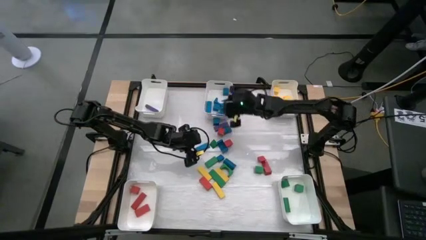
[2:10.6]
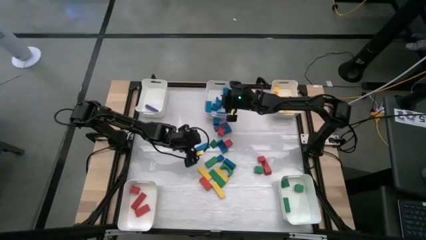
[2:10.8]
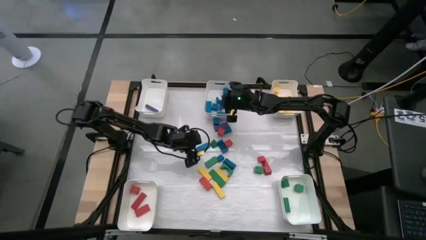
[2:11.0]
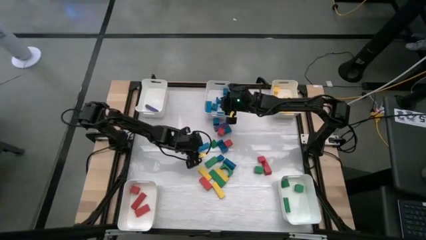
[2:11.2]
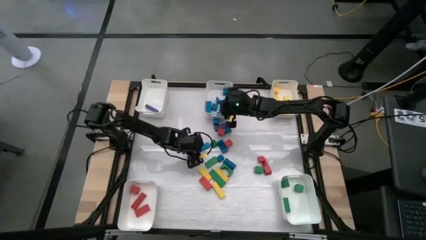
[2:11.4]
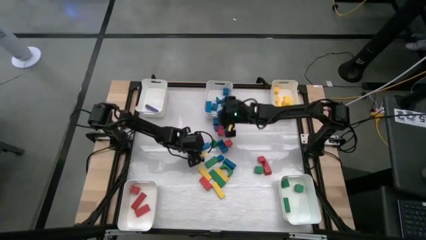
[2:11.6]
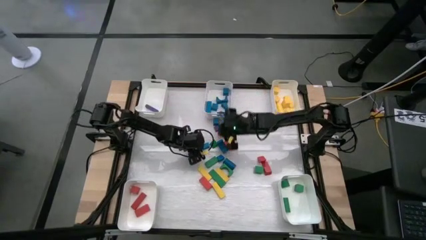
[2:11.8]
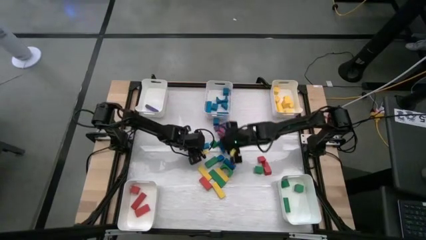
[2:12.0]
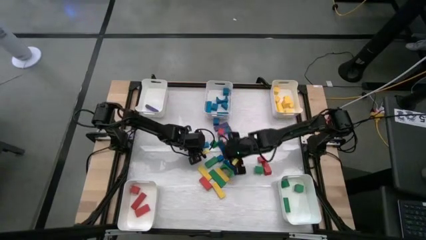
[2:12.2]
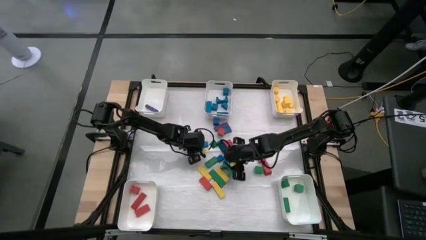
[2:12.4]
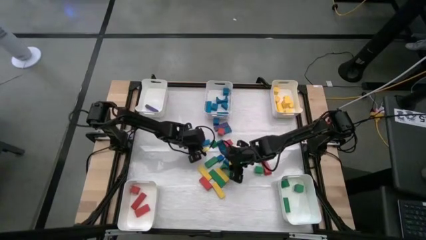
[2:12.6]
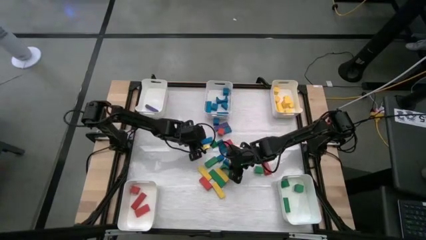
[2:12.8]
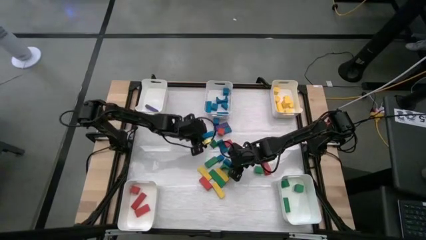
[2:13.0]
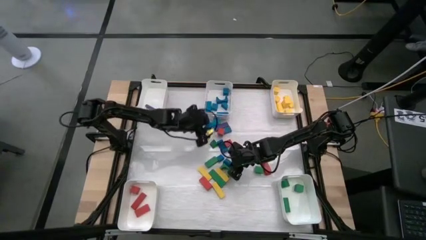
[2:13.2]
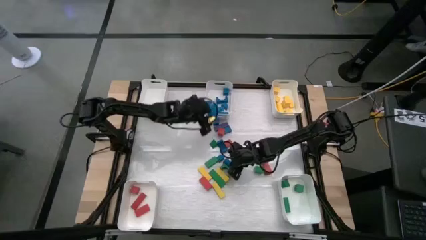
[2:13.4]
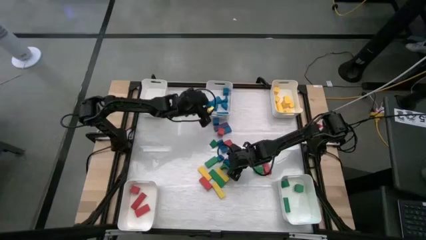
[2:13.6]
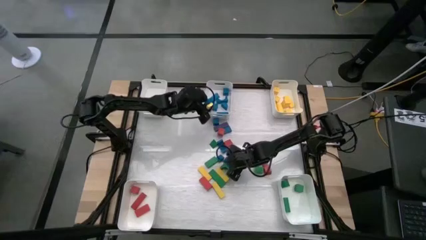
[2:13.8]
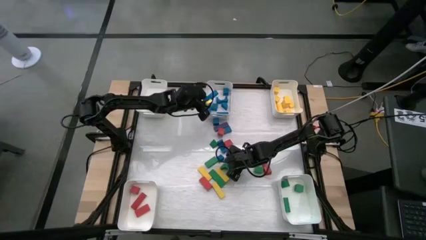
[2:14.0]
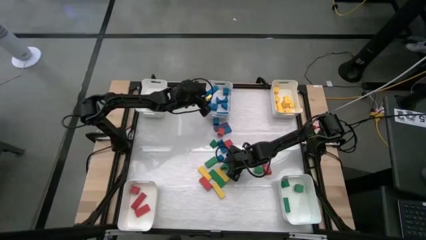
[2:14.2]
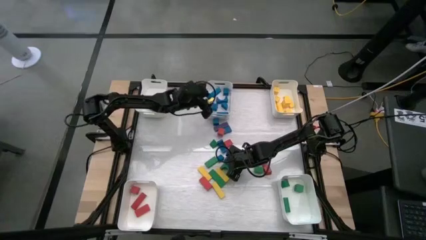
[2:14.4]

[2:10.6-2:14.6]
Task: Sort blocks
Put the blue block into the top center white bin

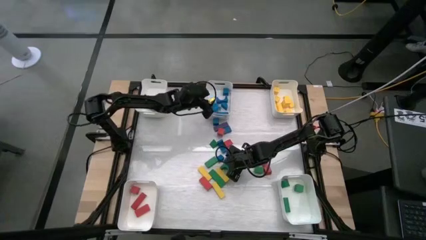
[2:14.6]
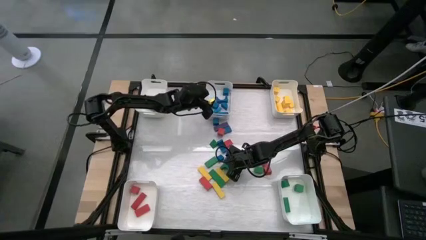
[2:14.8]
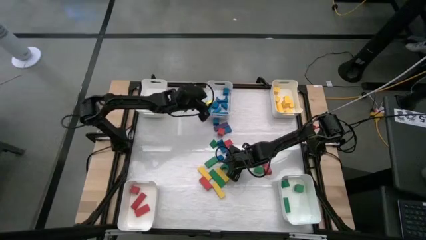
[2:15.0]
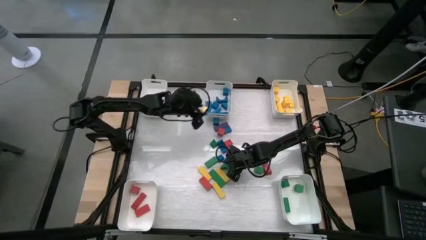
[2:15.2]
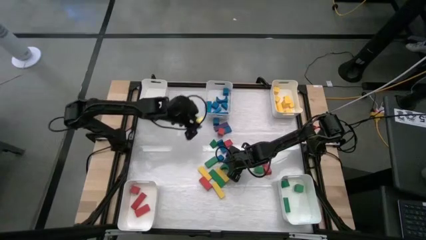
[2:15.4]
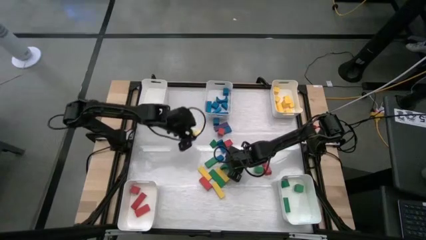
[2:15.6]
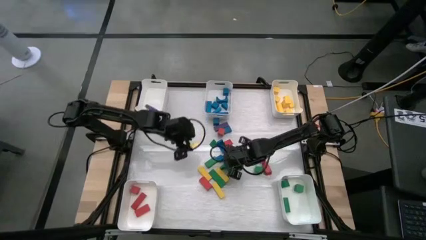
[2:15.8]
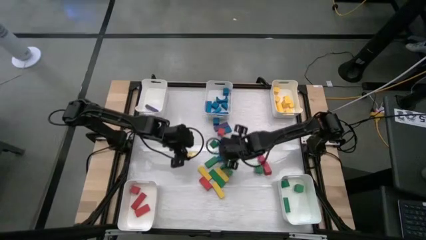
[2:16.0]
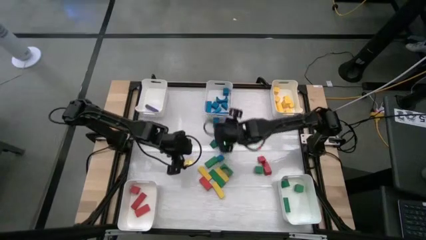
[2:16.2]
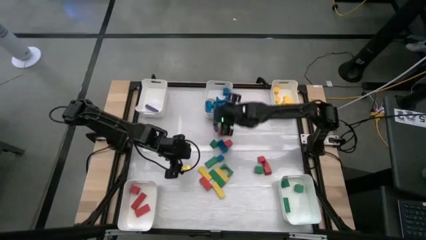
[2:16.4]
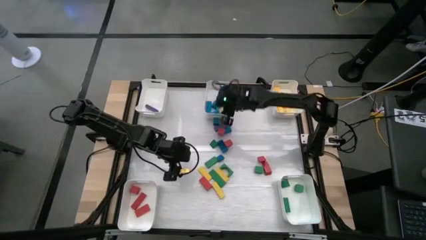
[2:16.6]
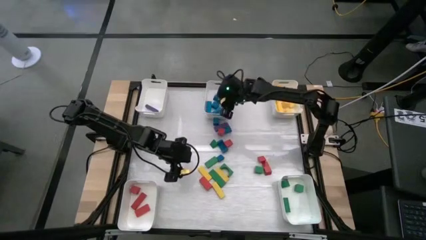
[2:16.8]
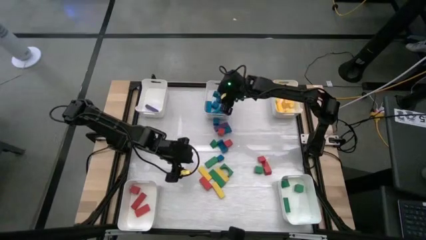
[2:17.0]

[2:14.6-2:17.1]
Put the blue block into the top center white bin

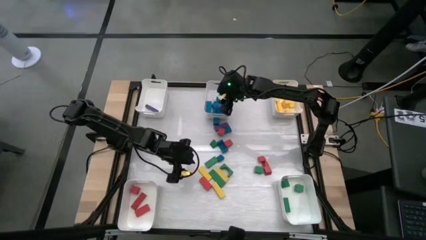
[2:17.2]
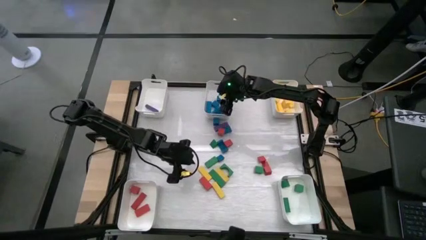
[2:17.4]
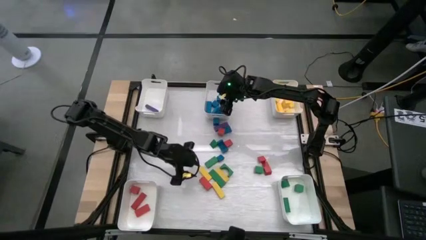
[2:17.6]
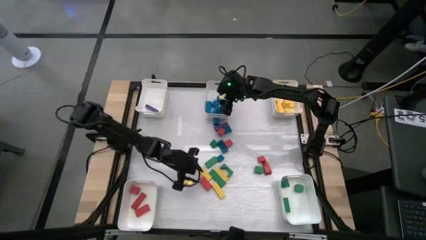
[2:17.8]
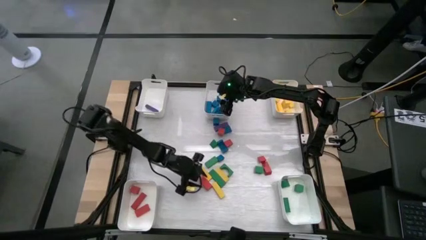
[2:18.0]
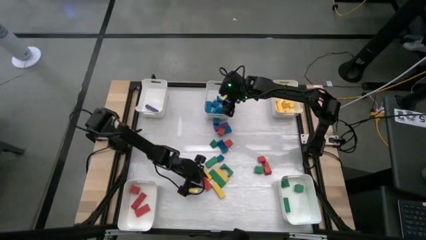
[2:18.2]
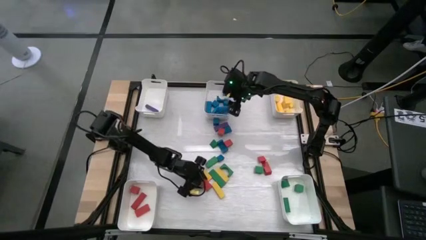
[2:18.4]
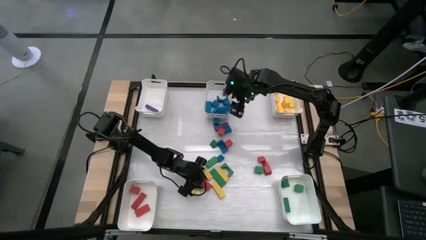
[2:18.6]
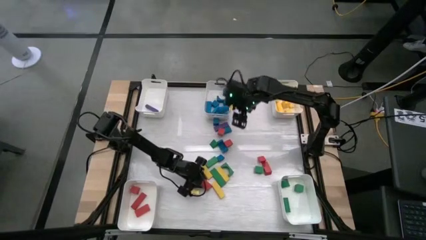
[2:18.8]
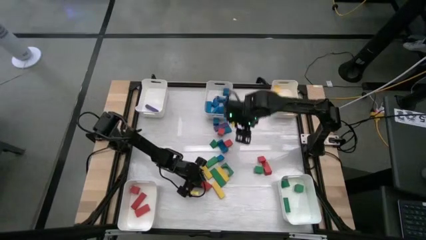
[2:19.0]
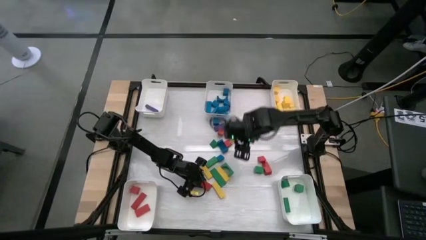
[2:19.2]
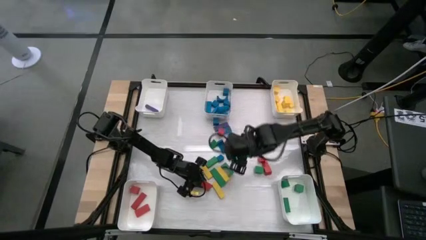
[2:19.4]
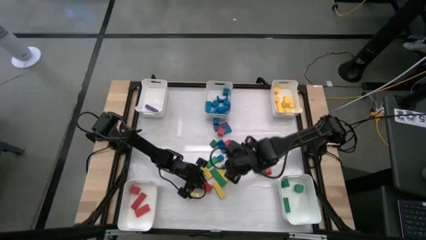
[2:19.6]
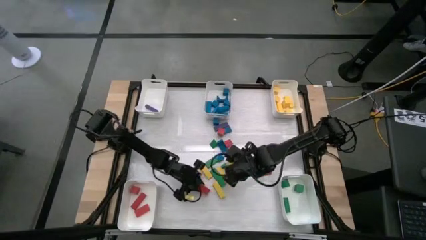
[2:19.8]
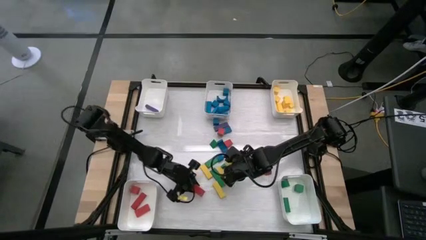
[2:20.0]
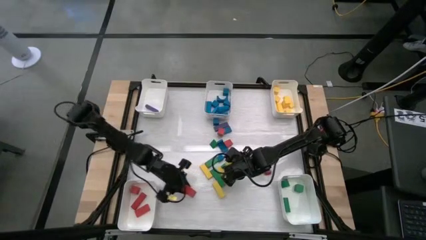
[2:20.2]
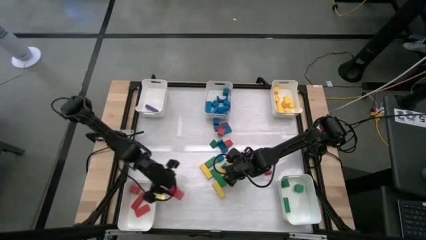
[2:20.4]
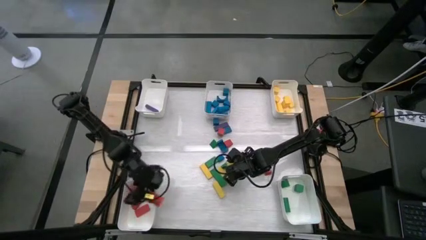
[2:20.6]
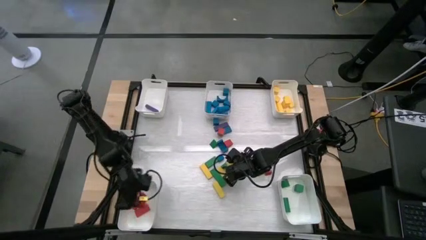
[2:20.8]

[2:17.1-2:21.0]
Put the red block into the bottom left white bin

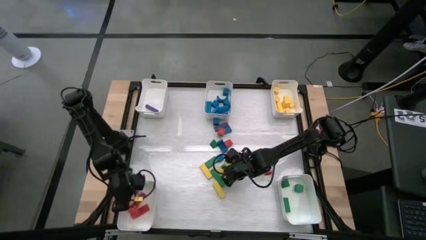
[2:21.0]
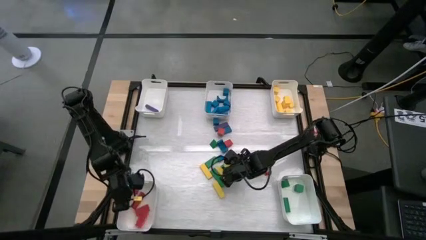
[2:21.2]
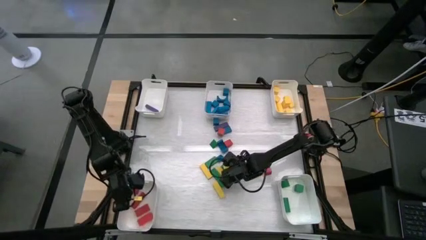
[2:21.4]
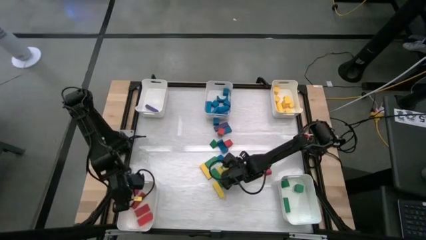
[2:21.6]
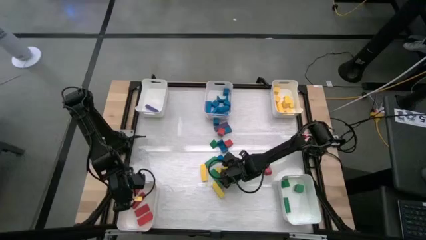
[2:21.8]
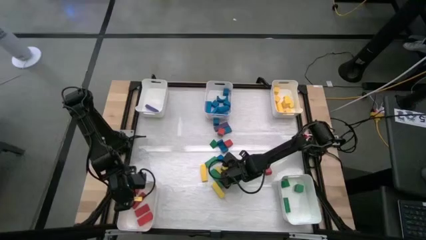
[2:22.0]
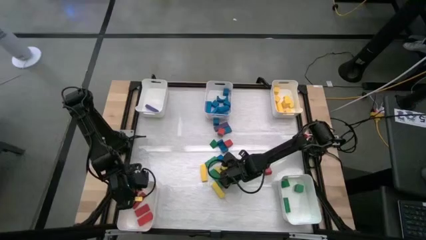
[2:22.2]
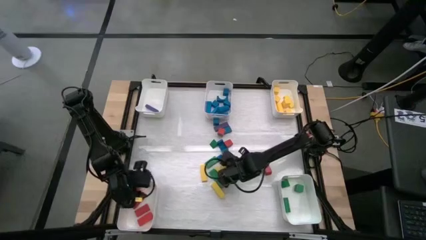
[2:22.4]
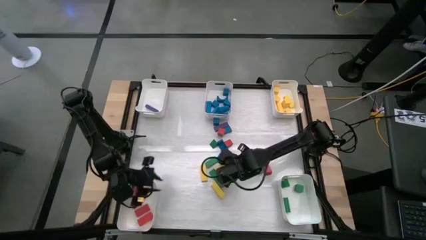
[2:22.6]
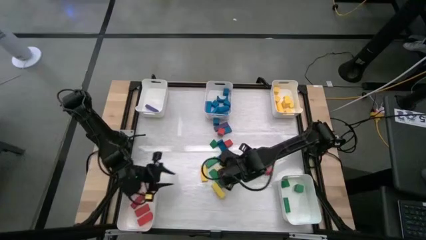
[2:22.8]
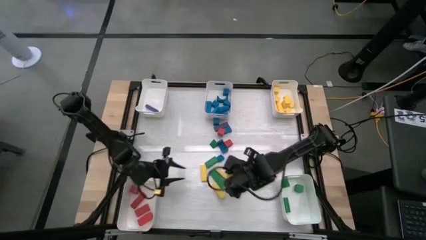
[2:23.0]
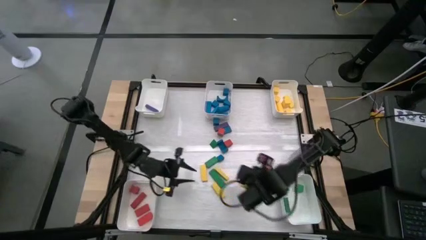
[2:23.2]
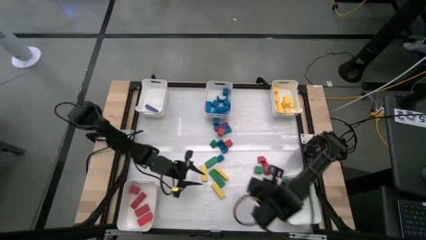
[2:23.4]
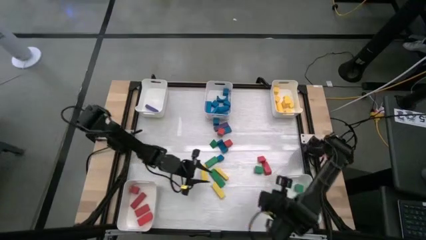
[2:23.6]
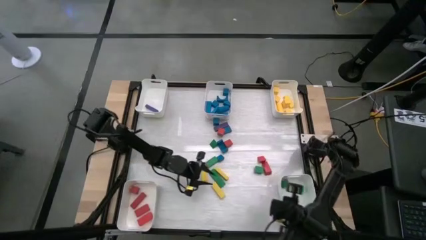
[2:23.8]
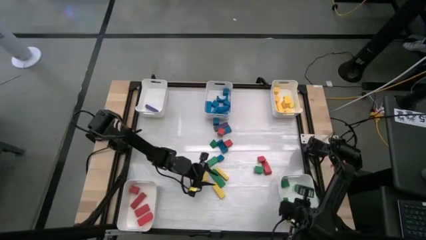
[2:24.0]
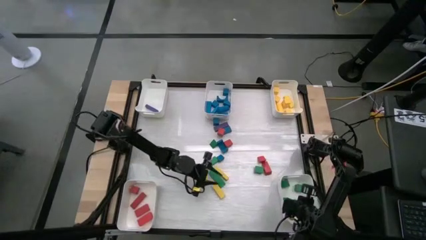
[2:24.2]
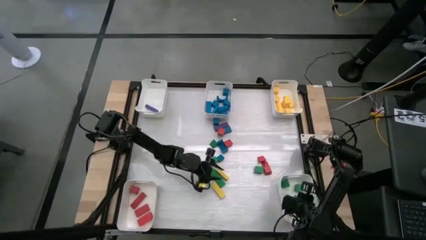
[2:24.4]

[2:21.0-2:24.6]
Put the green block into the bottom right white bin

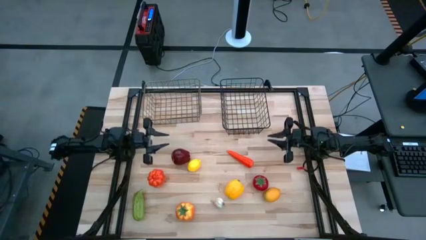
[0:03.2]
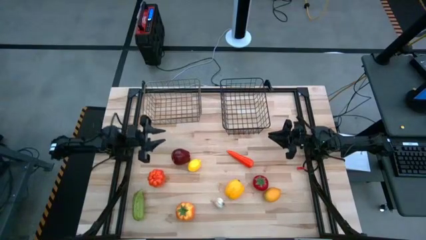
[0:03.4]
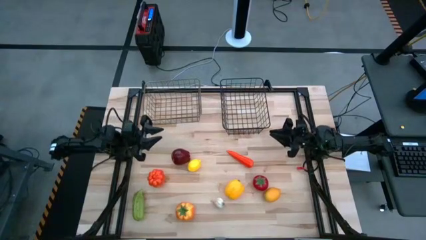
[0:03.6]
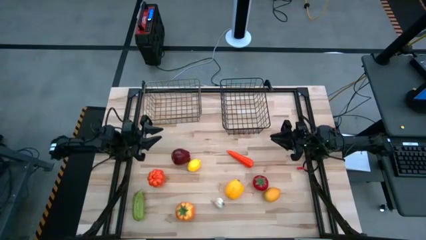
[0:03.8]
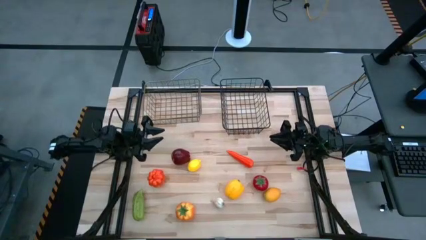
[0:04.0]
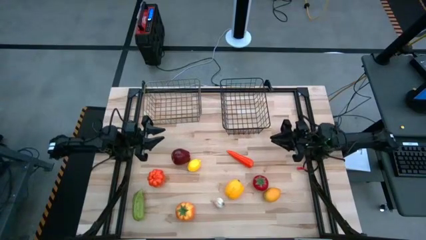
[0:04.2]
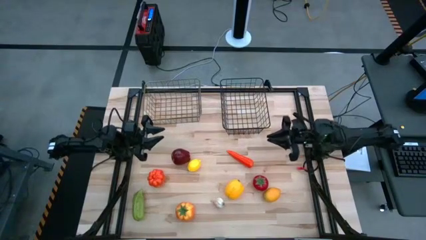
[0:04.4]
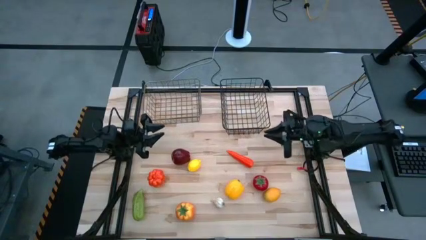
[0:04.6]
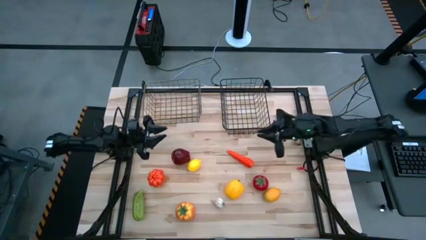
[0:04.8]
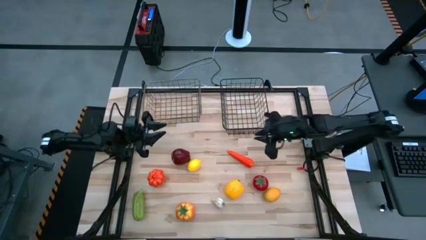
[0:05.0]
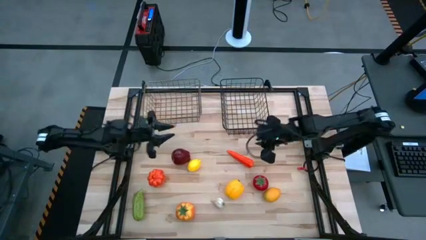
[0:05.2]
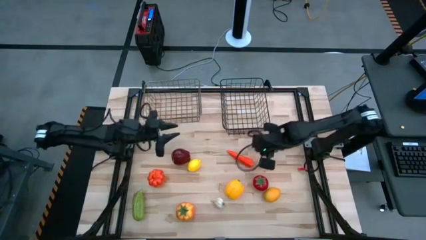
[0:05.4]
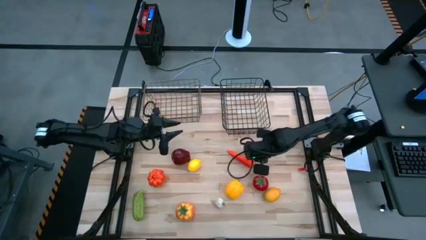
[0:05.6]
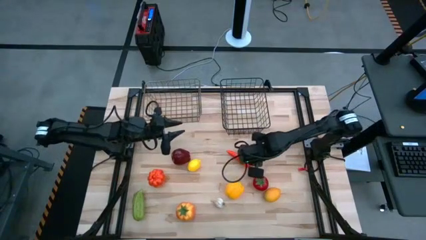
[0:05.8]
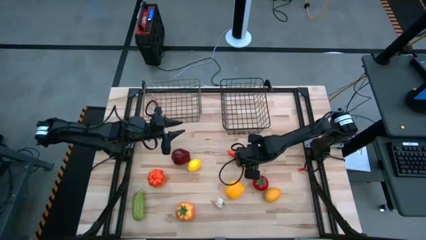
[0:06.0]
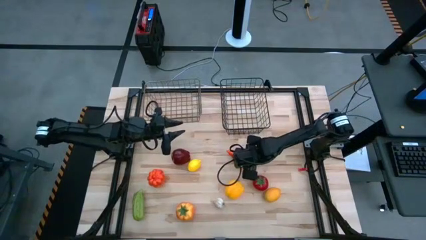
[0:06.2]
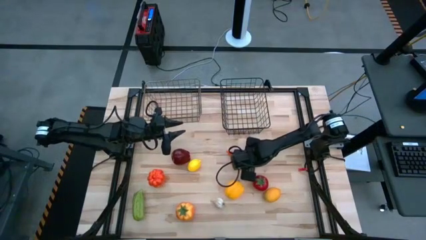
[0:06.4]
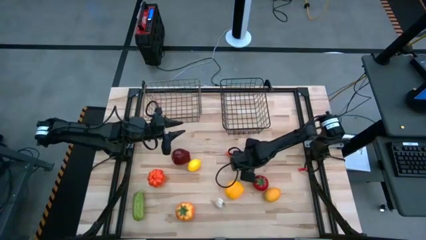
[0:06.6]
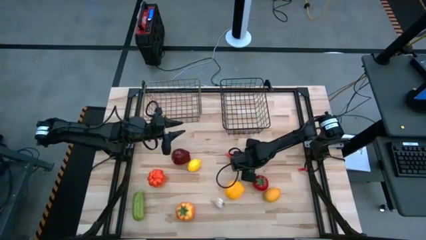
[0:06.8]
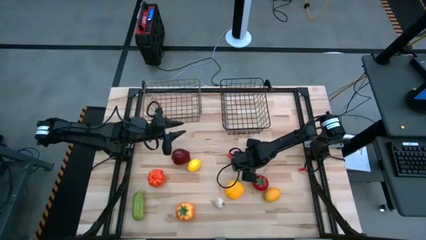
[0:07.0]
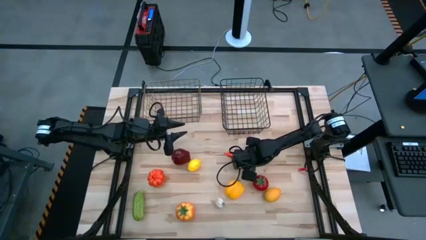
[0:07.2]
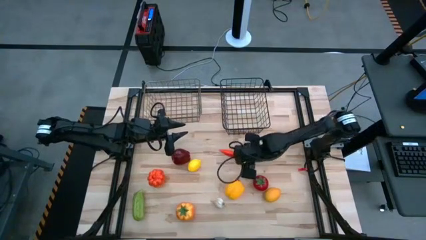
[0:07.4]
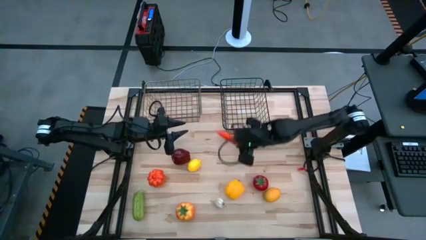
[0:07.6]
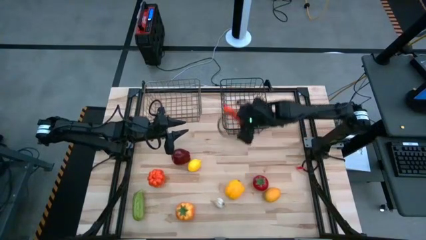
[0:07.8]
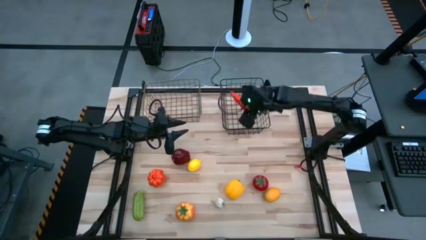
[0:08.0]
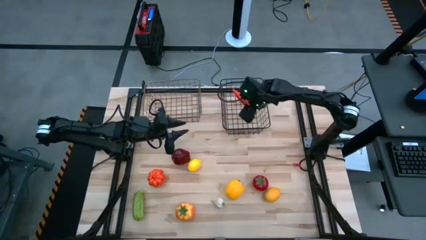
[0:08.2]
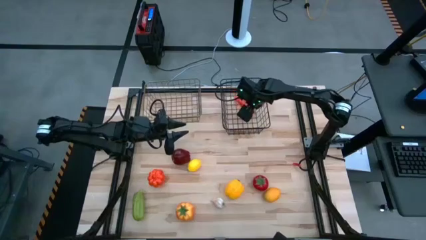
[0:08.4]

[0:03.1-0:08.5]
Task: Sort produce into baskets
Put the carrot into the black wire basket
